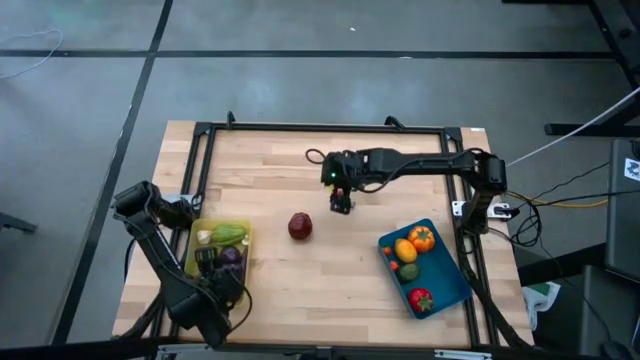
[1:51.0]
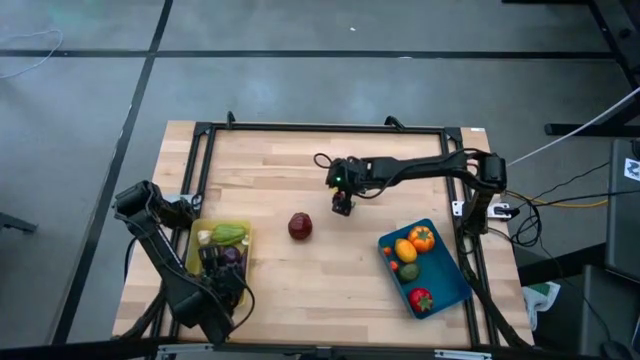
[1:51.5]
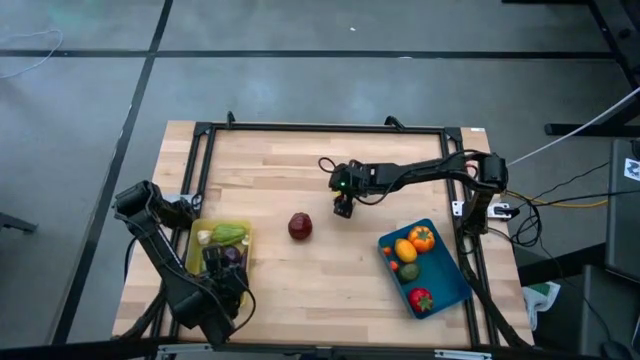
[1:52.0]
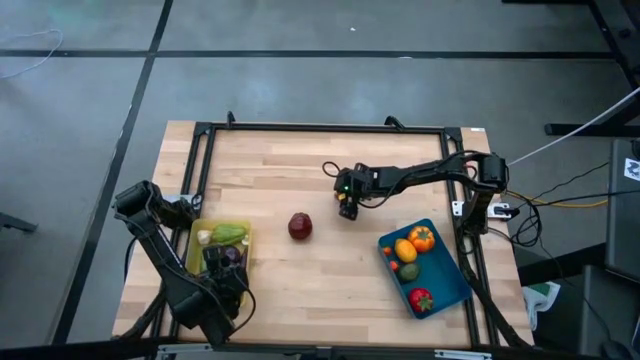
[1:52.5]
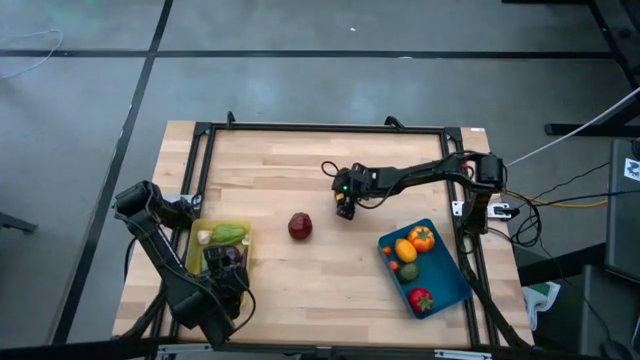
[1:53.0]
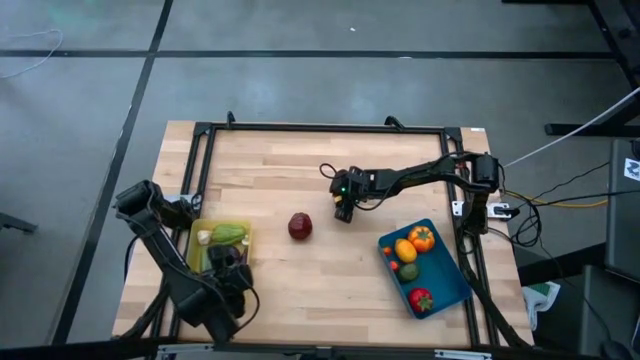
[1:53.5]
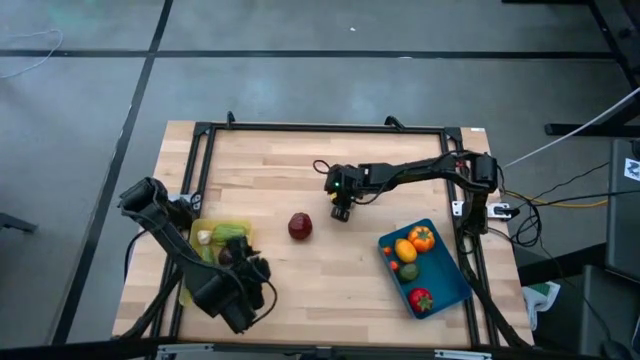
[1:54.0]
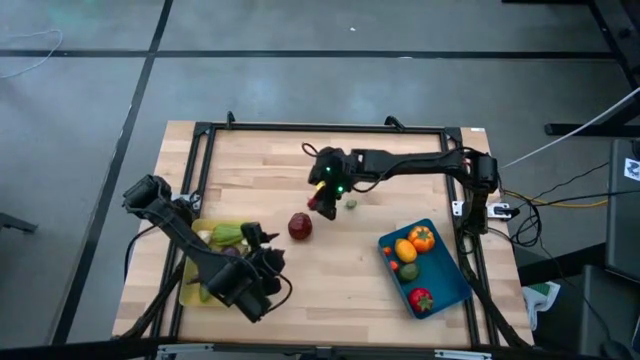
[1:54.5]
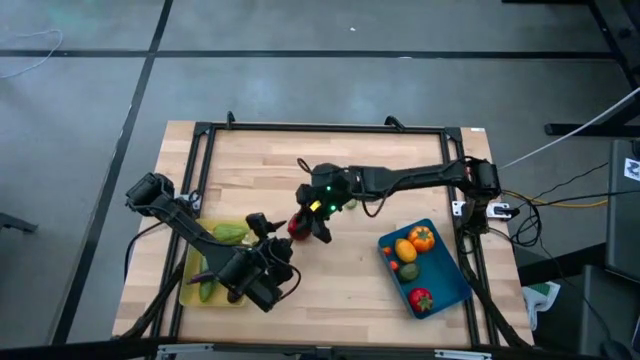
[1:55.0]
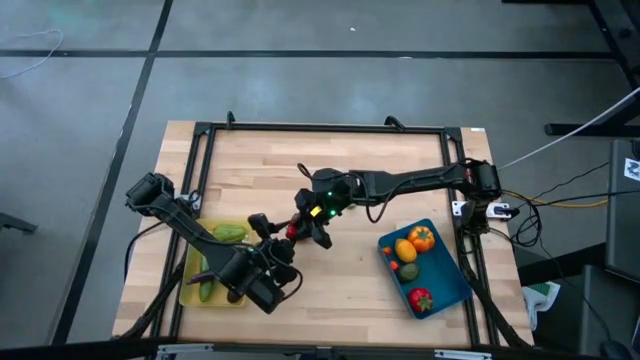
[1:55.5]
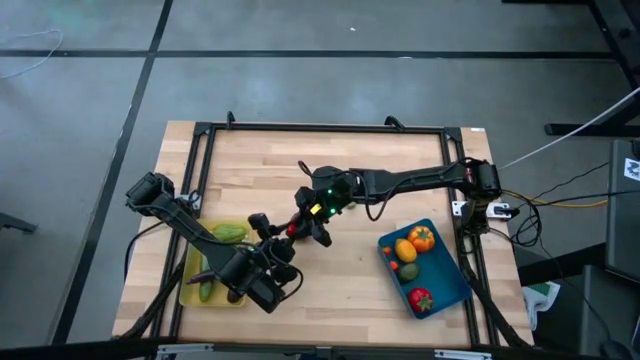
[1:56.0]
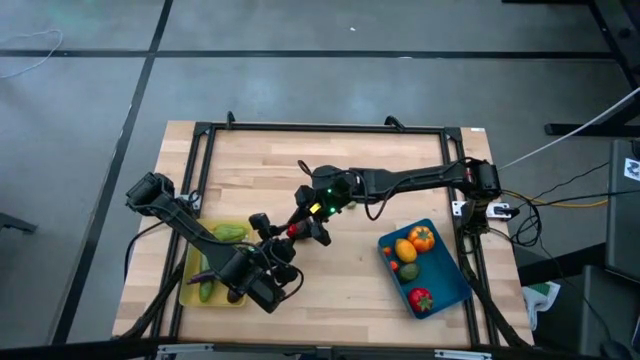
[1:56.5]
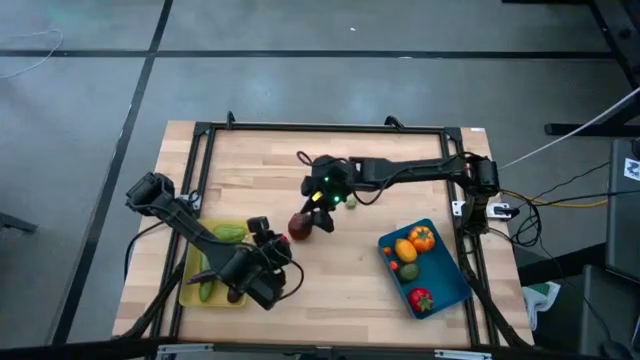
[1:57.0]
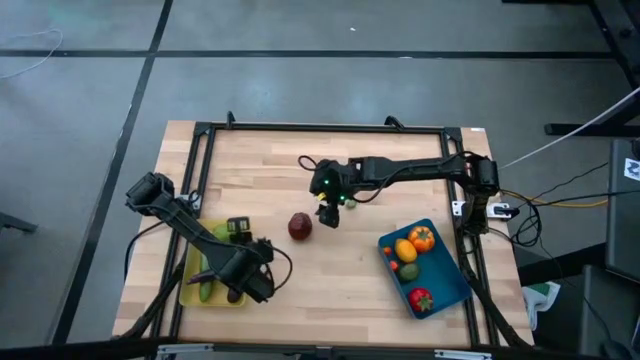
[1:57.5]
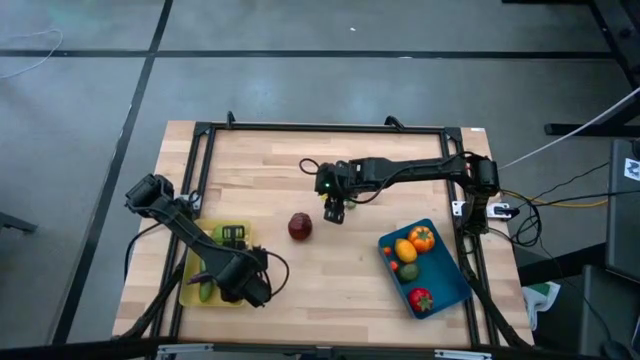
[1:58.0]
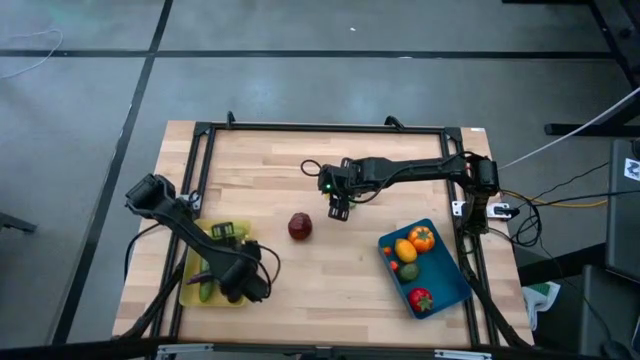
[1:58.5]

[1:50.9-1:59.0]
Task: Sort produce into baskets
Put the red chili pepper into the yellow bin

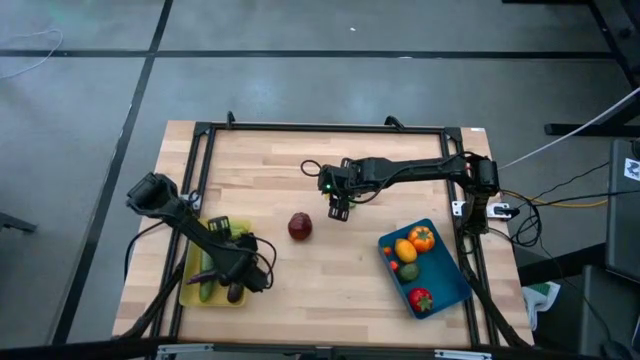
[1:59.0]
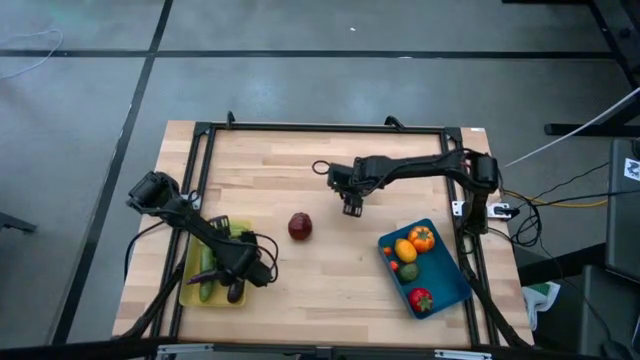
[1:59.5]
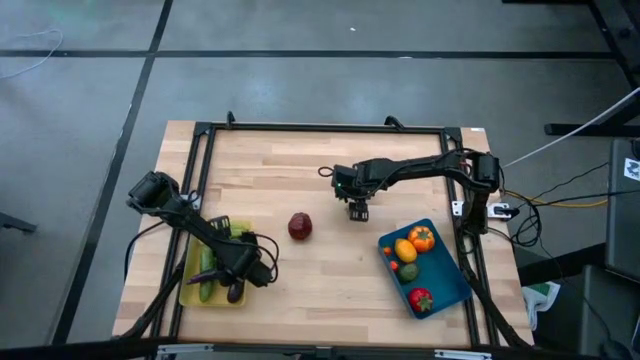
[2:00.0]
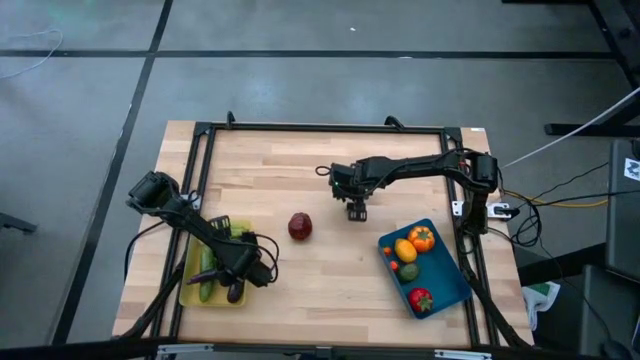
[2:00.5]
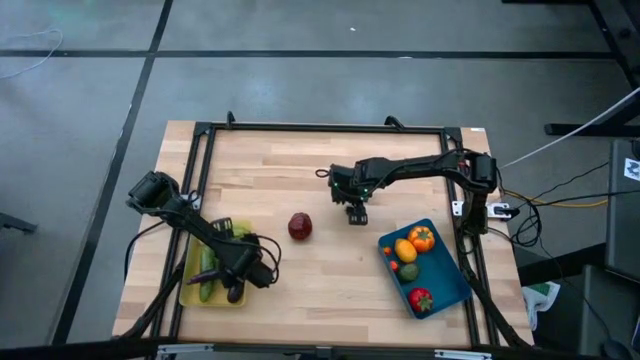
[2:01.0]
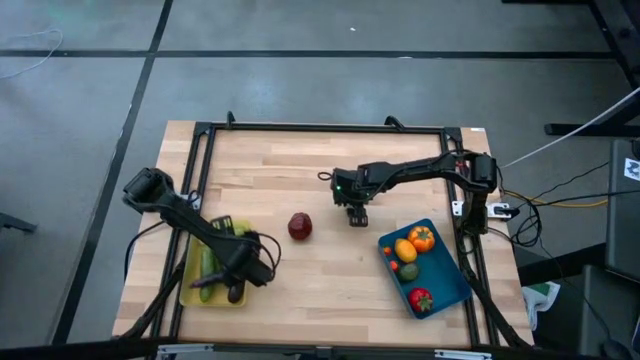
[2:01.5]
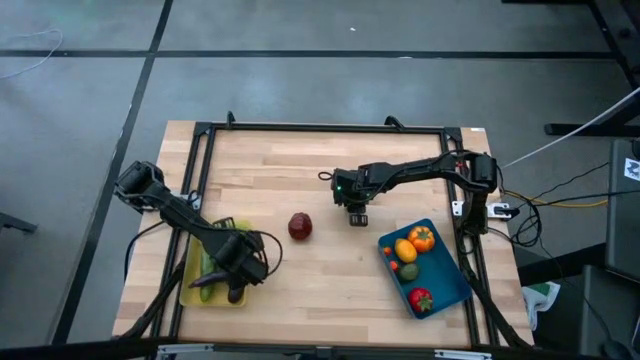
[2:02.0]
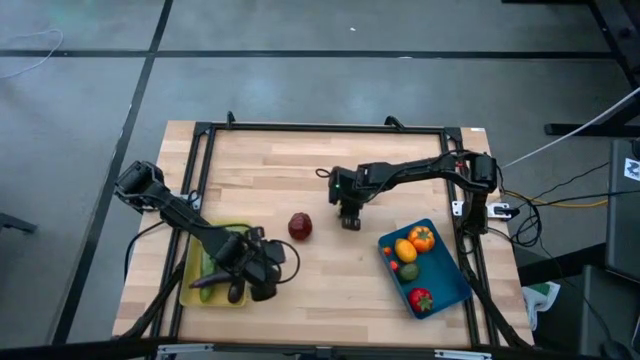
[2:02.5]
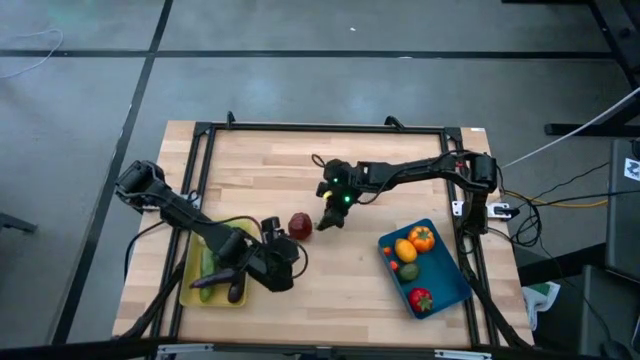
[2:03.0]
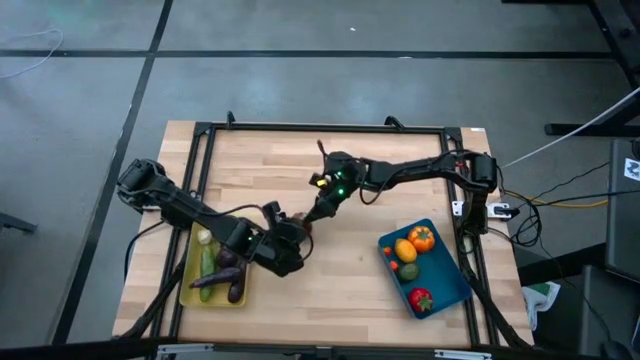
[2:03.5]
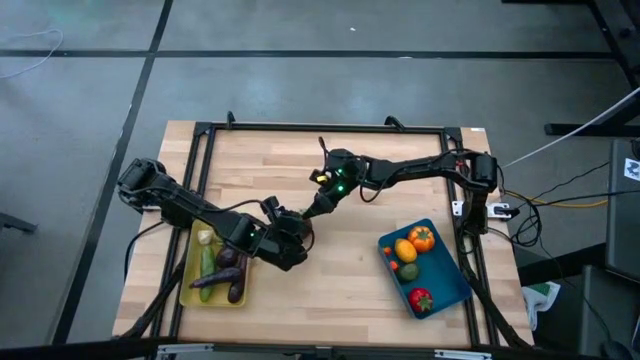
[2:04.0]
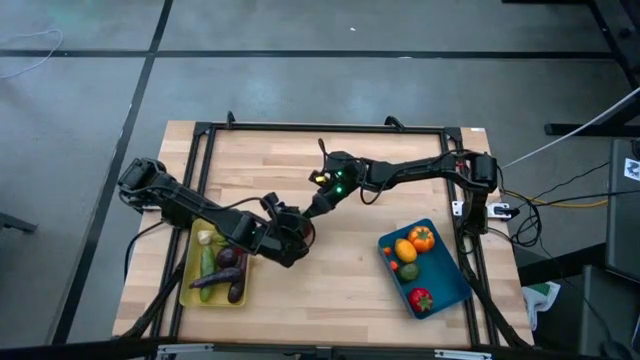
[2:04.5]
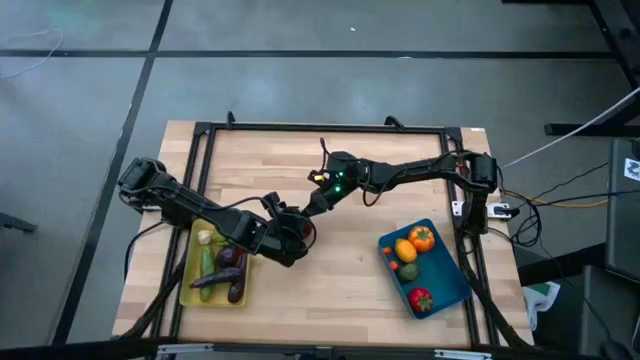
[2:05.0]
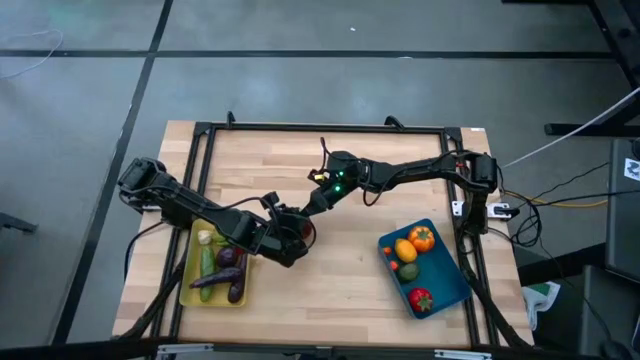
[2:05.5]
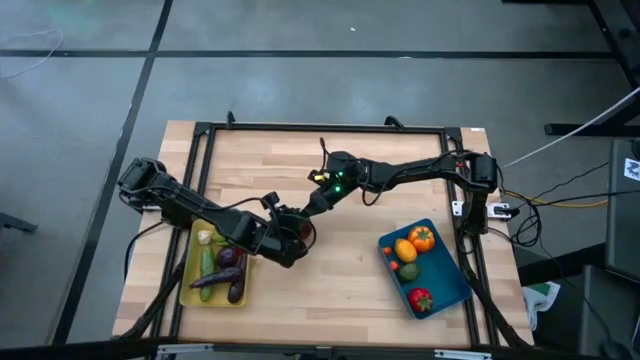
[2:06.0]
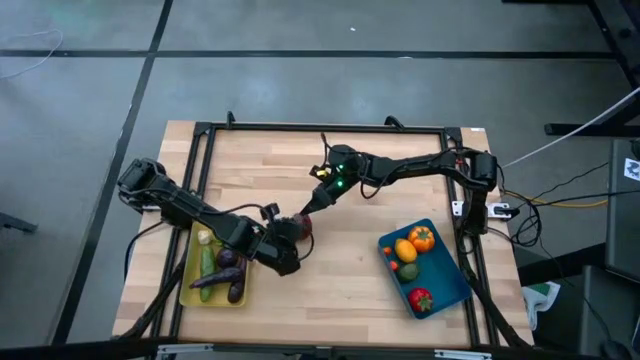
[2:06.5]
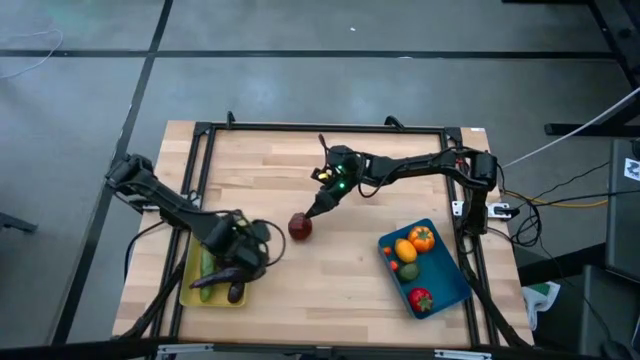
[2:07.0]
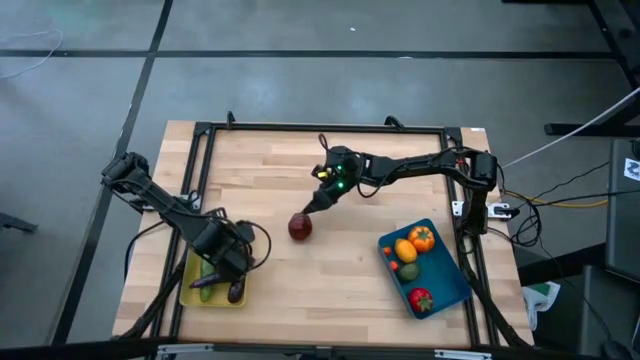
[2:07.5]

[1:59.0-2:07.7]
Put the green chili pepper into the yellow bin

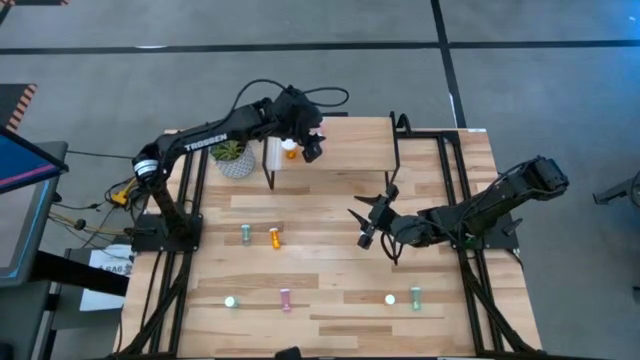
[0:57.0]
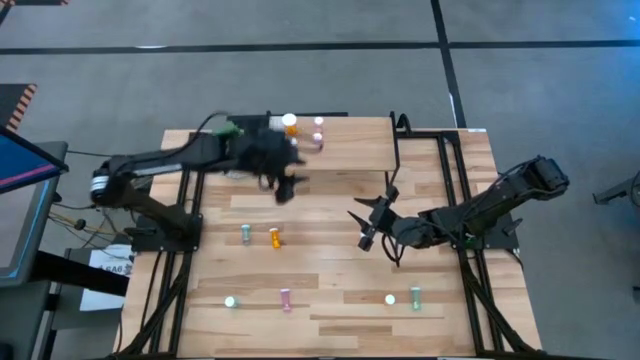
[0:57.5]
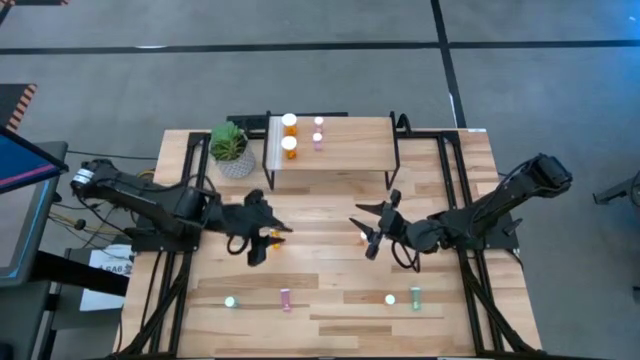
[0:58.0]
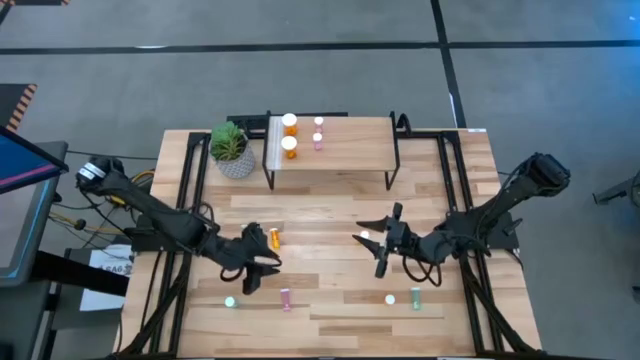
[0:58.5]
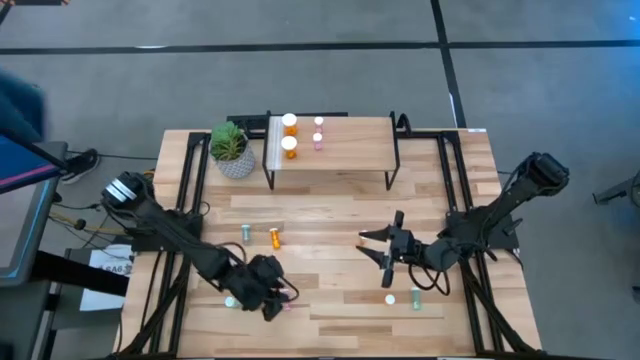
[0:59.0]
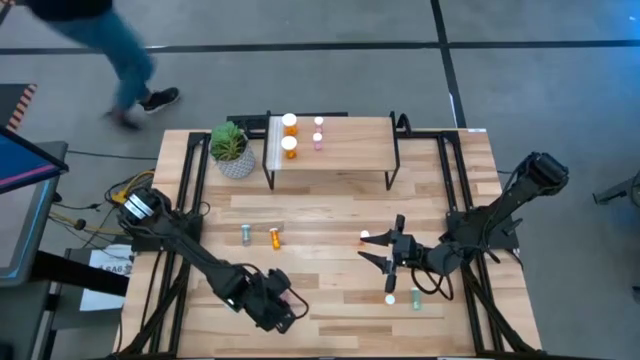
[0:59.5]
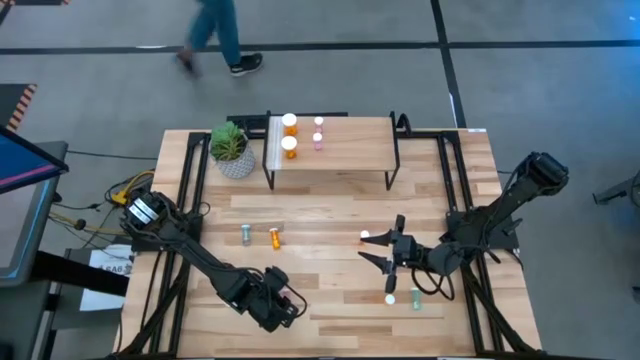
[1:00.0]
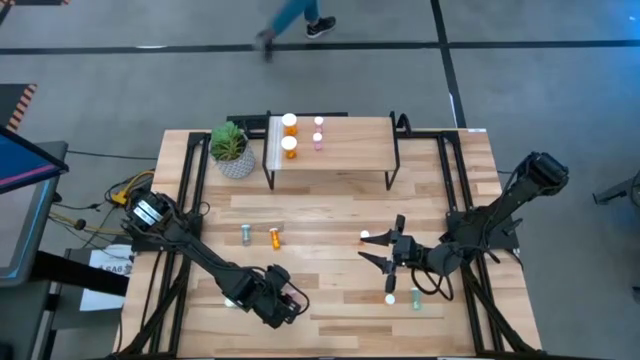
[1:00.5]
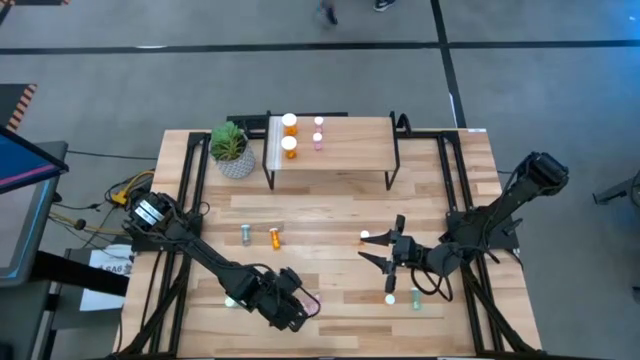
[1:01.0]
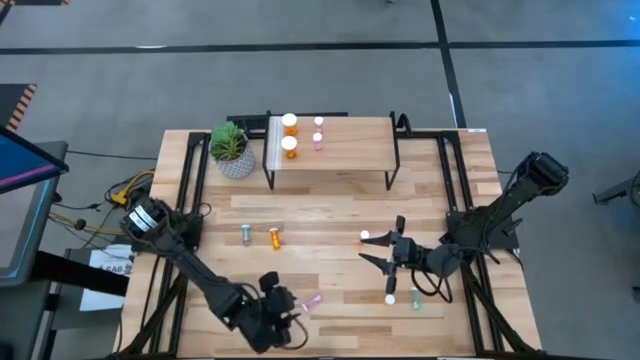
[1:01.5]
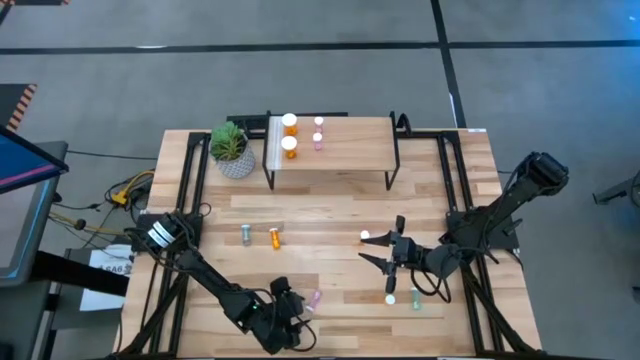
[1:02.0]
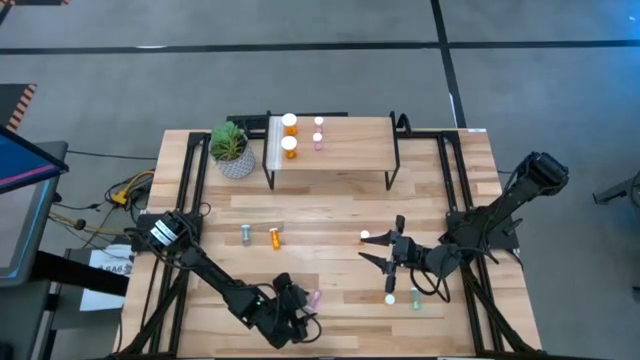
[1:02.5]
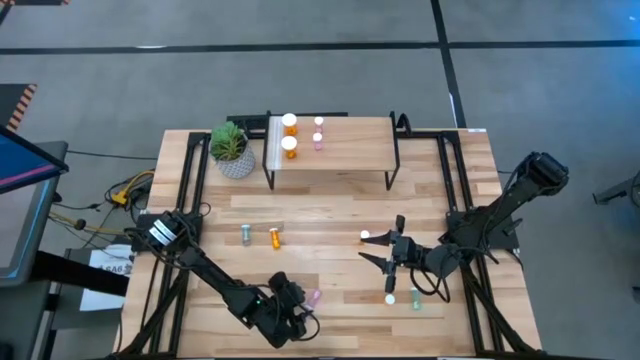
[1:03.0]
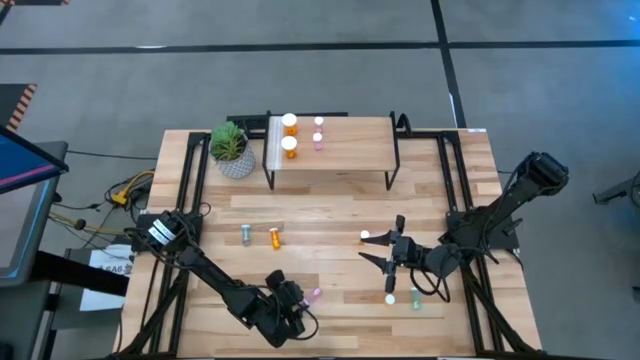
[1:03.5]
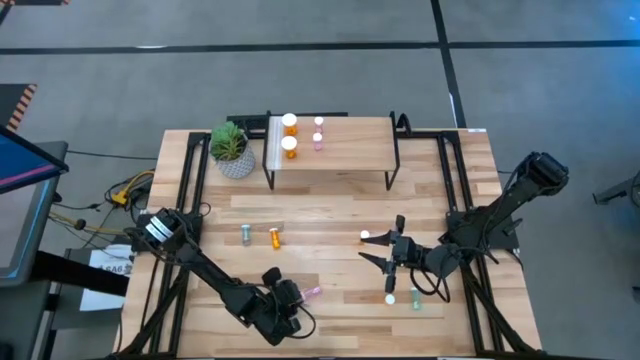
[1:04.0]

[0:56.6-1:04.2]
Task: Pick and place medicine bottles onto shelf by color
Put the pink bottle aligned with the other pink pill bottle on the shelf
